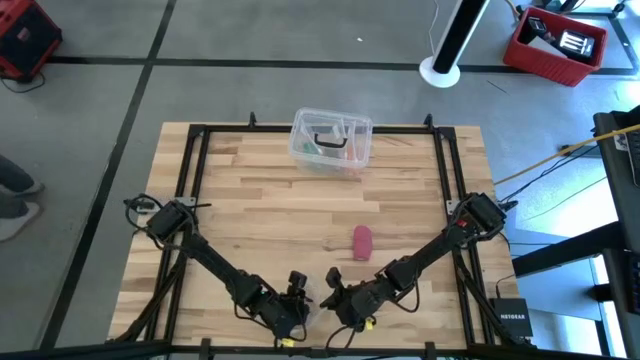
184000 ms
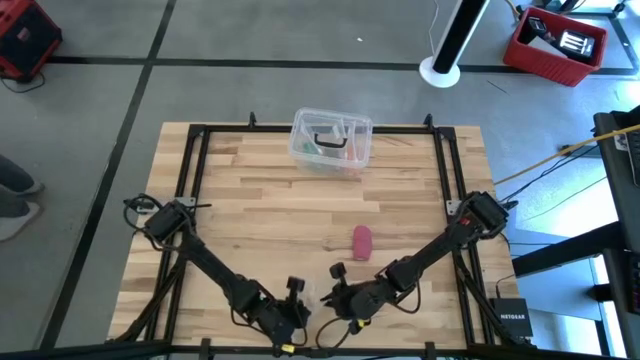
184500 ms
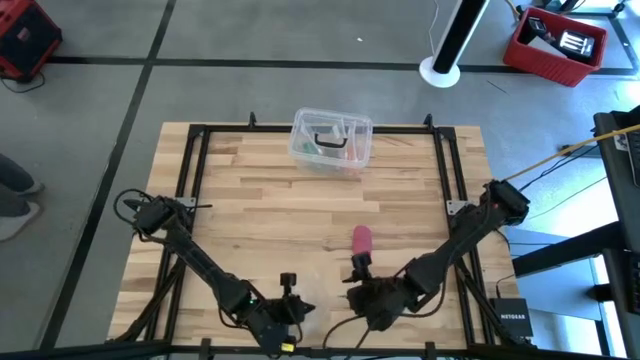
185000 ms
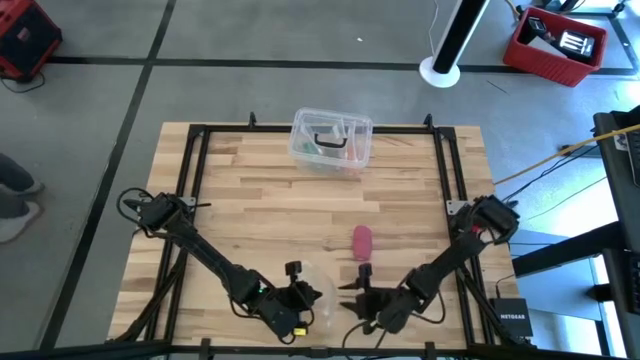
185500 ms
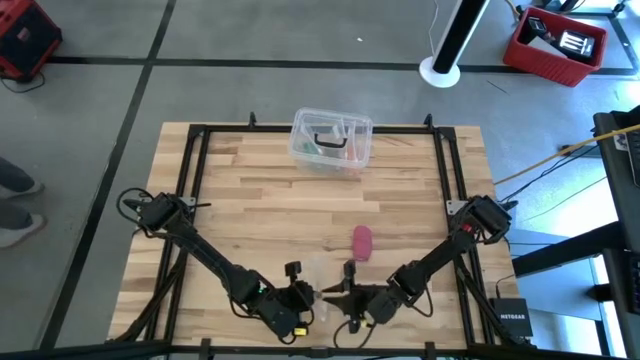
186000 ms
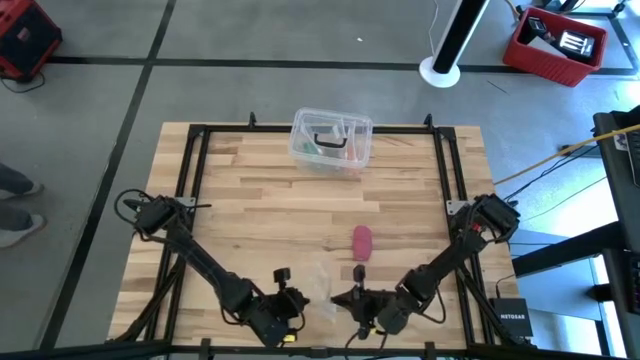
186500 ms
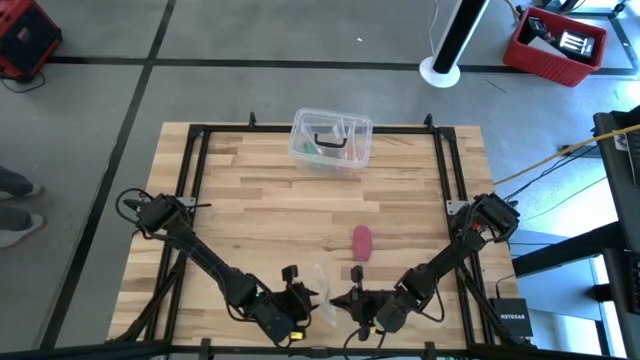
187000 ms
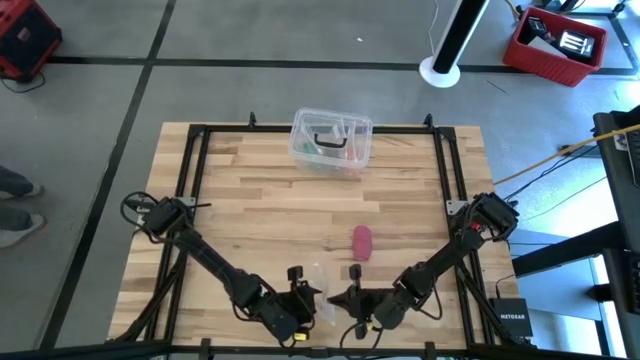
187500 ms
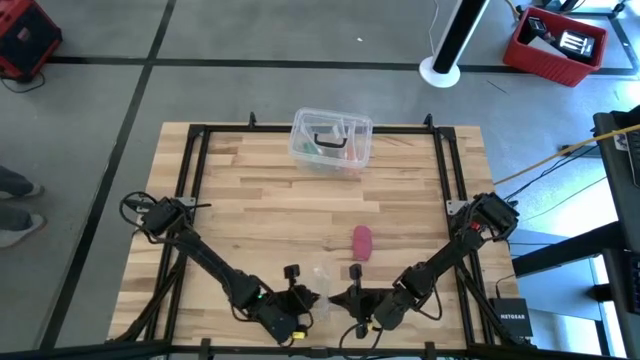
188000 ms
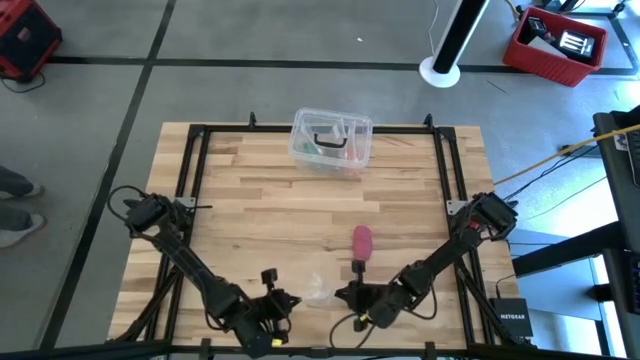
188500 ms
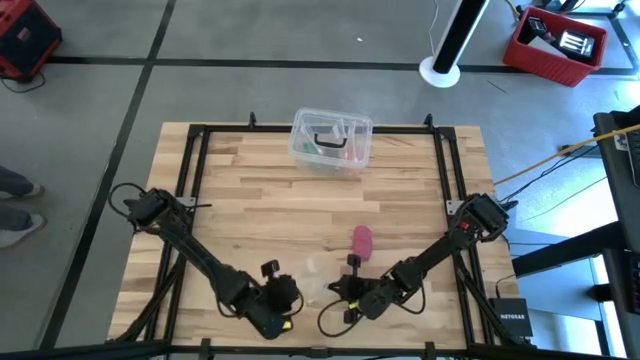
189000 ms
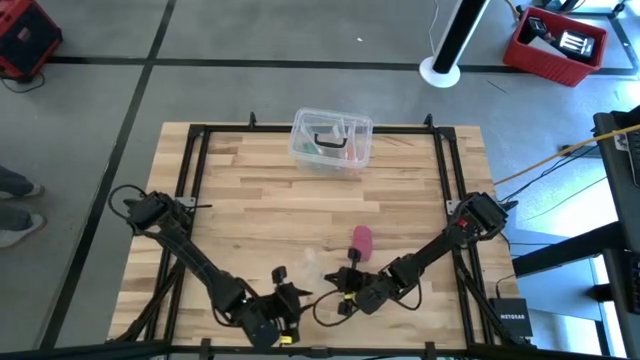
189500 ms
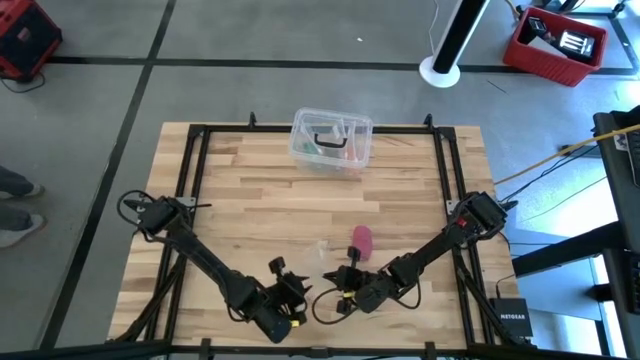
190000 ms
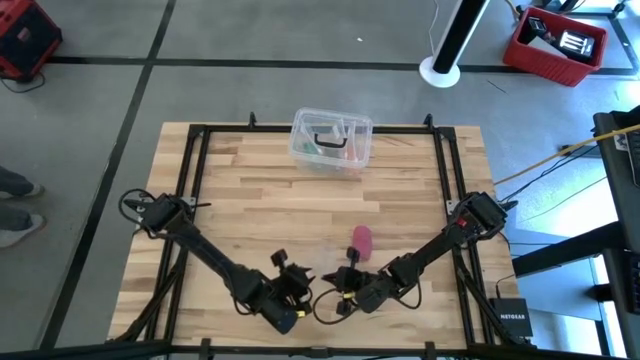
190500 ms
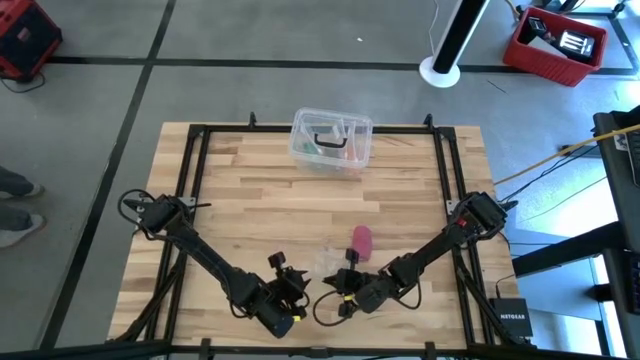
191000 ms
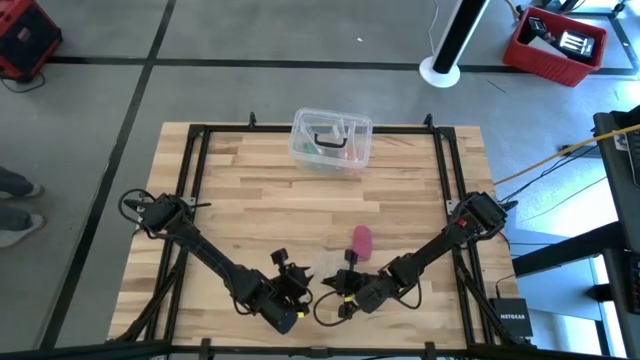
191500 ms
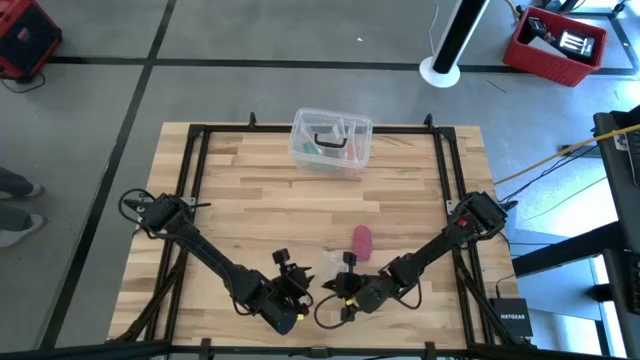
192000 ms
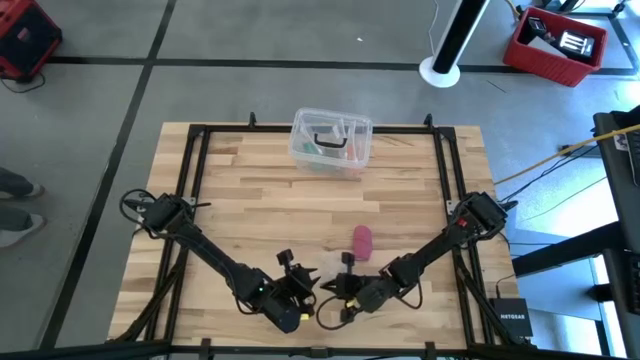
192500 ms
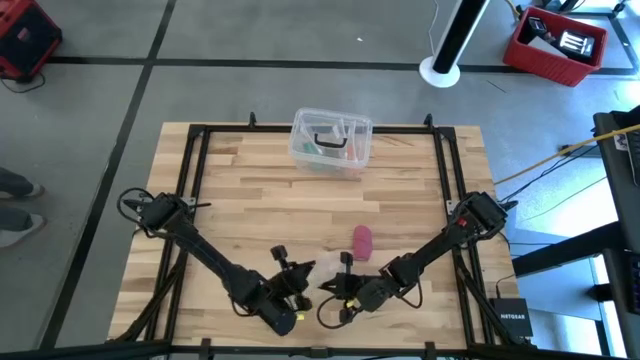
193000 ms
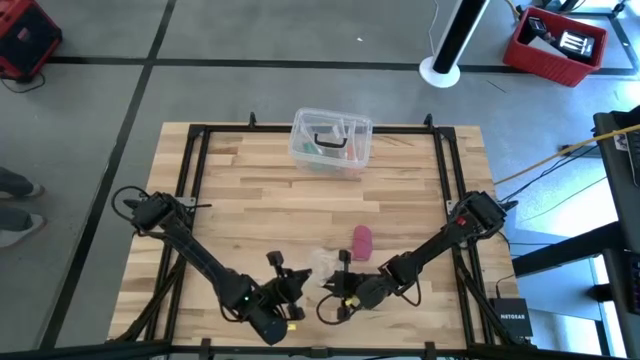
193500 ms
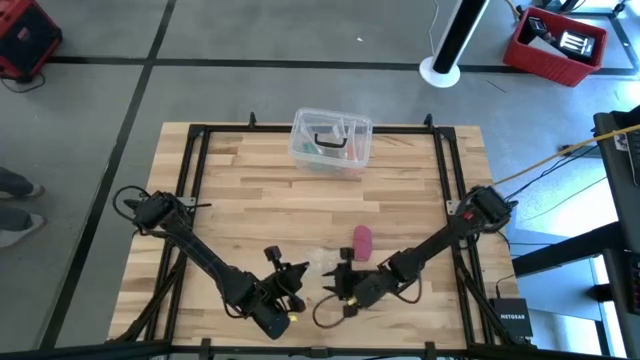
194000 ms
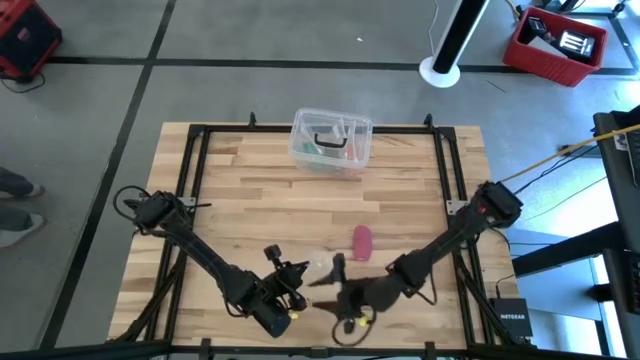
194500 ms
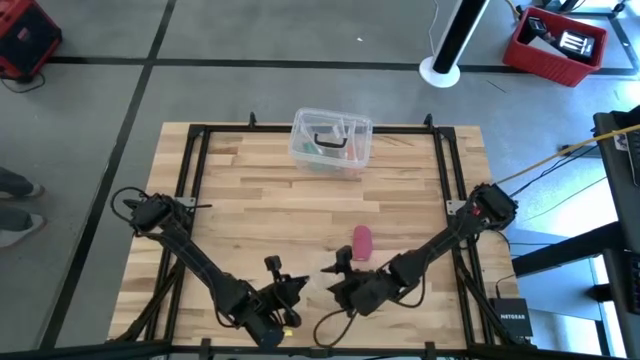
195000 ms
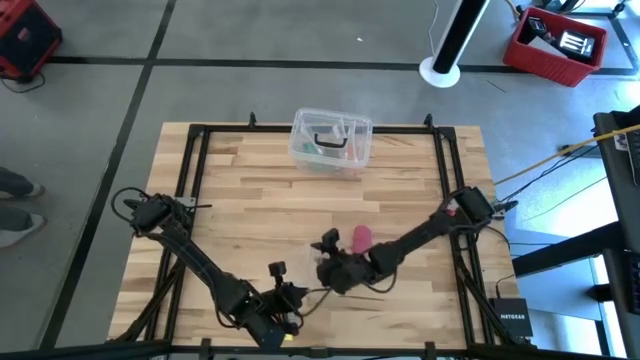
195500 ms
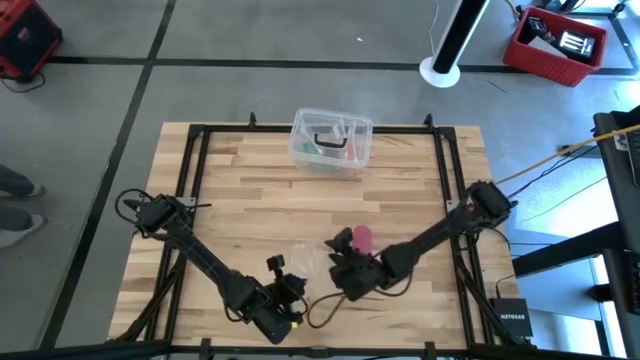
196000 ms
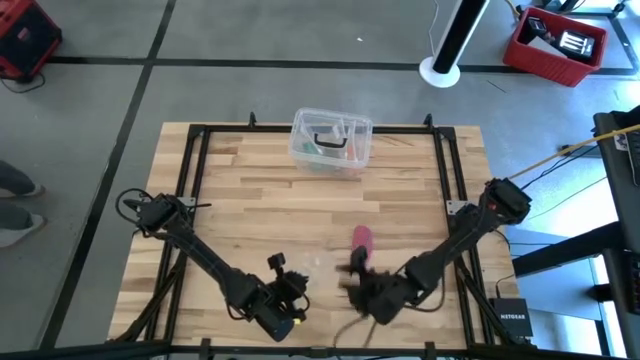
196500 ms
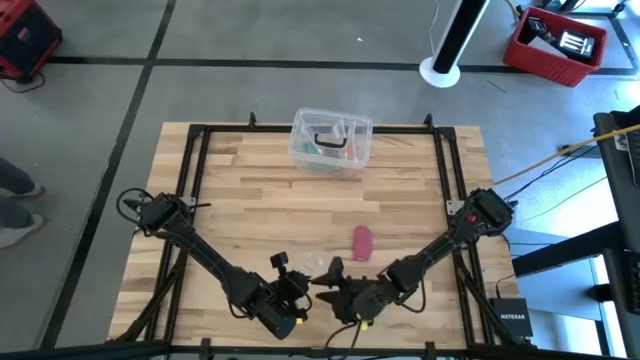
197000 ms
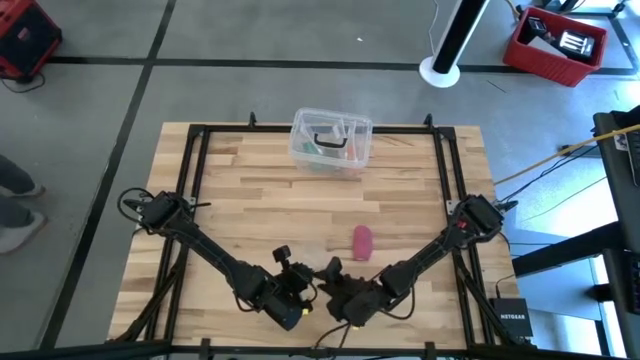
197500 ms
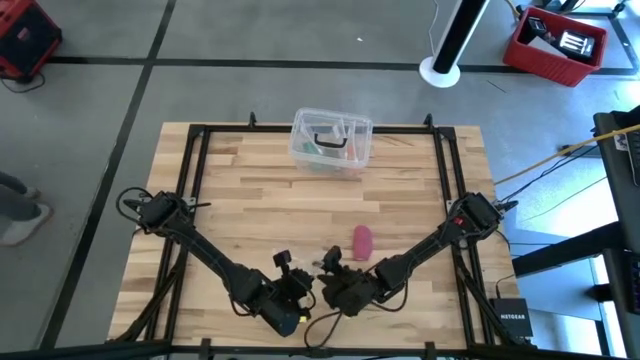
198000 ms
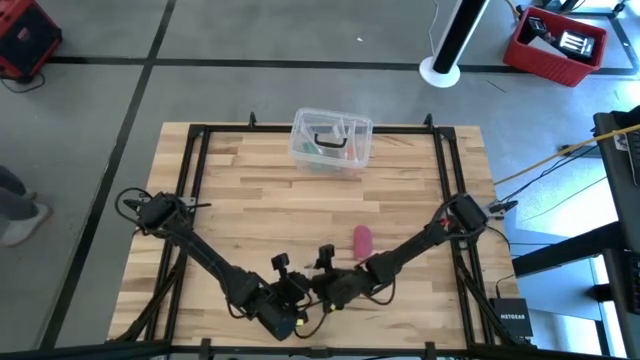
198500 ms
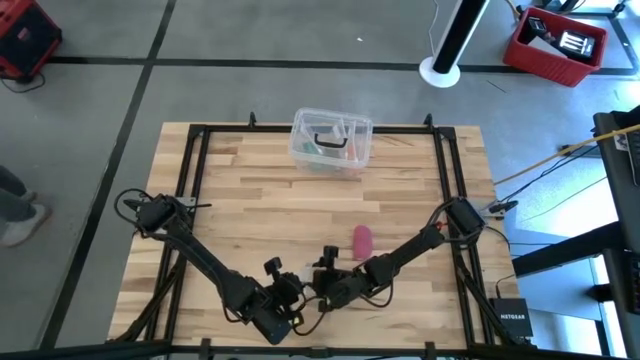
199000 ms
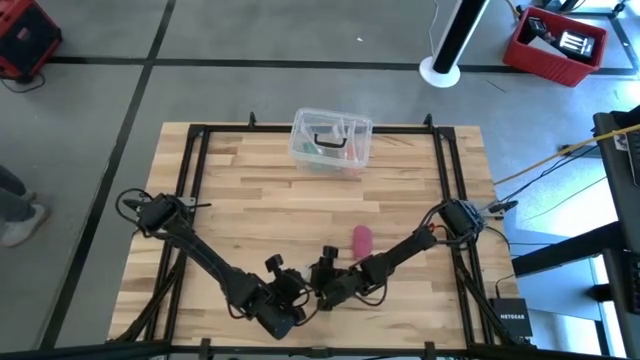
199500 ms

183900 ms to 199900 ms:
Task: Roll bandage
Open the transparent zip bag

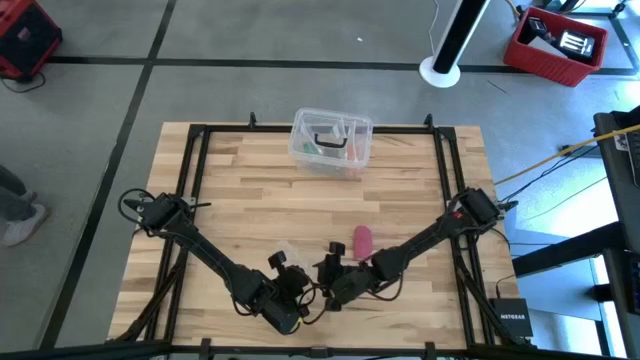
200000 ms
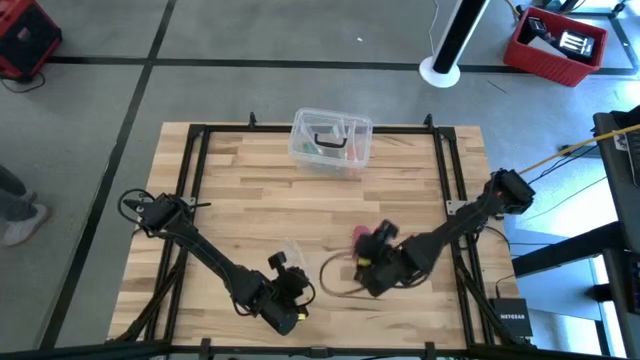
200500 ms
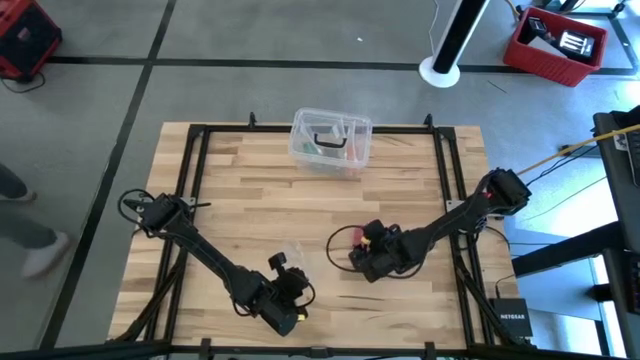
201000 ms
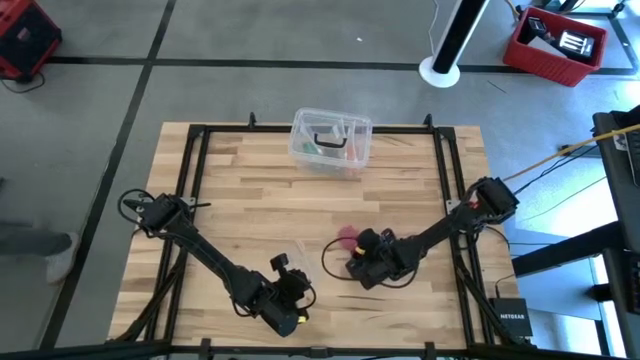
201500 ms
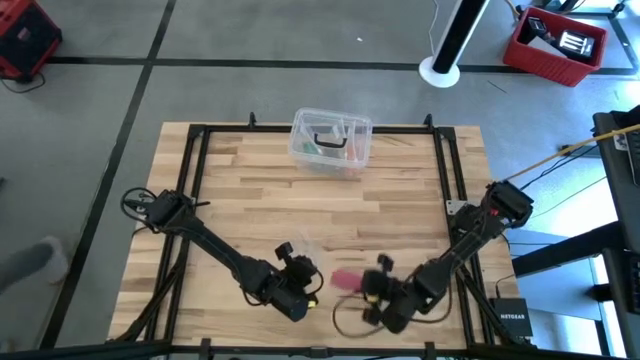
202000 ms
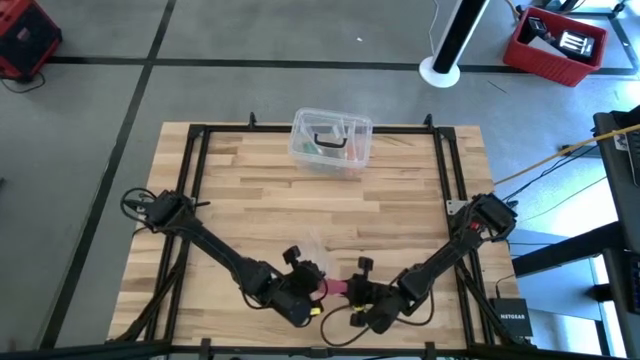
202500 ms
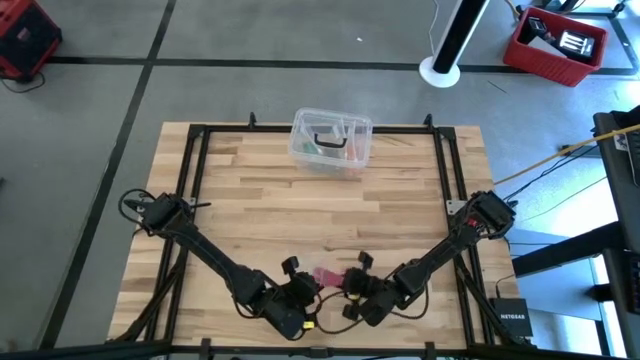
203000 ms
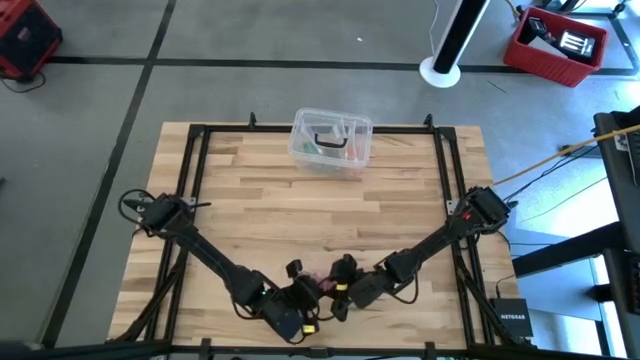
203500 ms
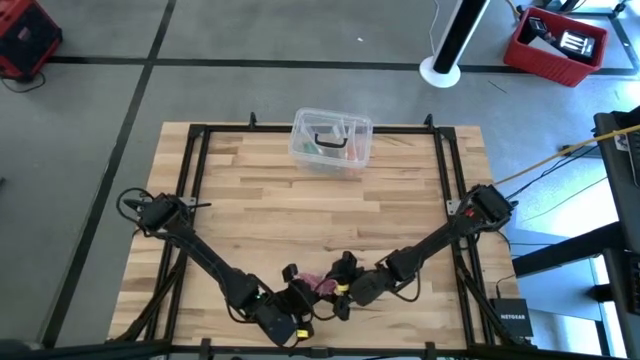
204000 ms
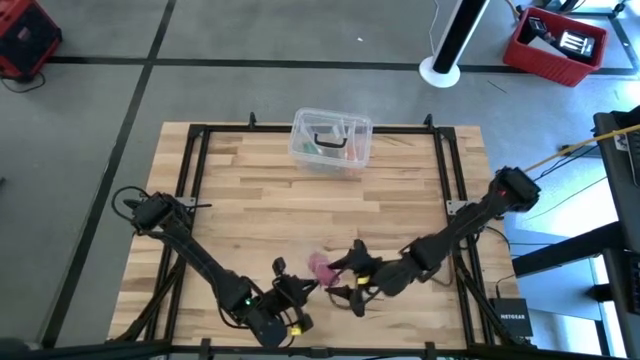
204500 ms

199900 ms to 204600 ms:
Put the pink bandage into the transparent zip bag

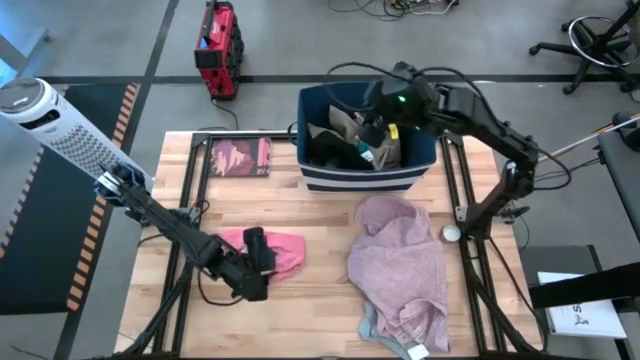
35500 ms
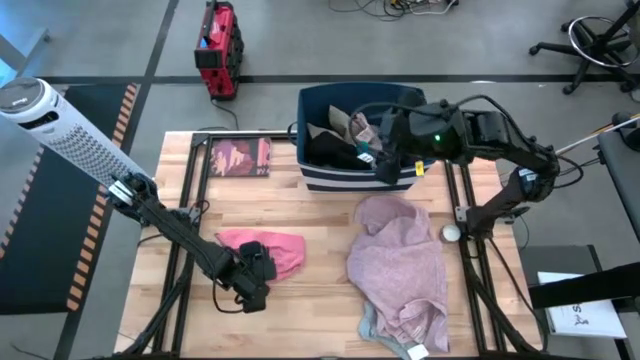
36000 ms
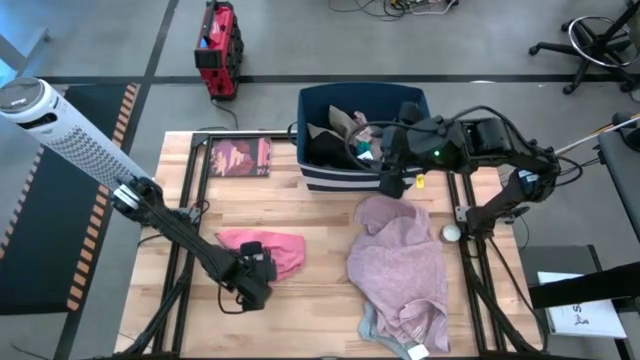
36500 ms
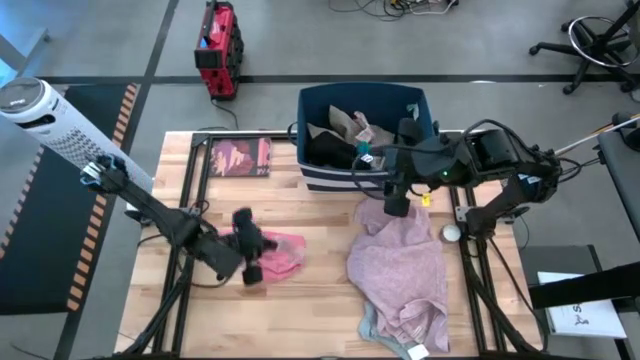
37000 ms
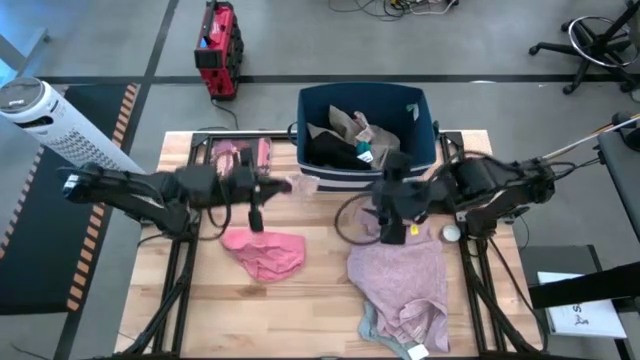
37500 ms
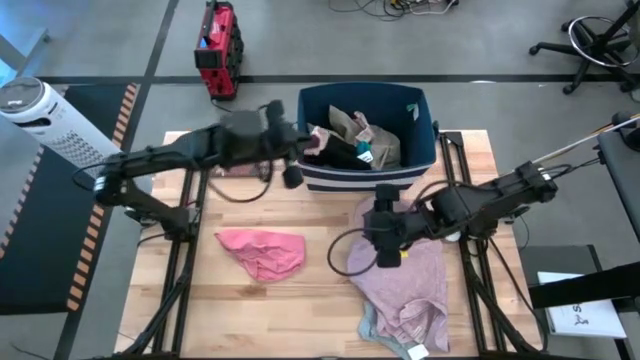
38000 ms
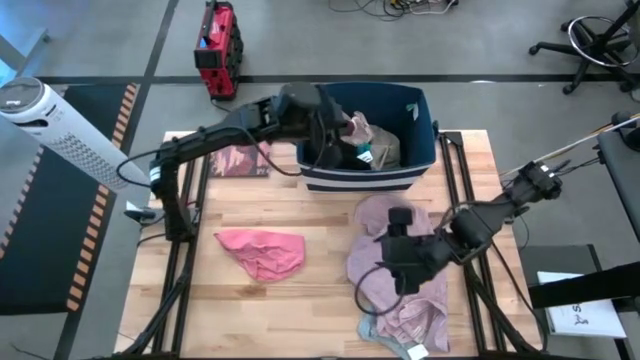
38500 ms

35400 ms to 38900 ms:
Task: Sort clothes
Put the striped white sock into the blue laundry bin
